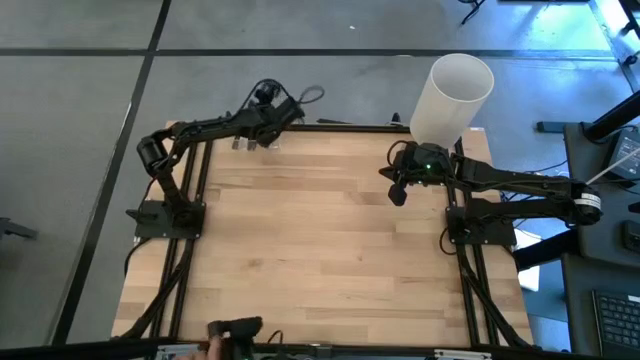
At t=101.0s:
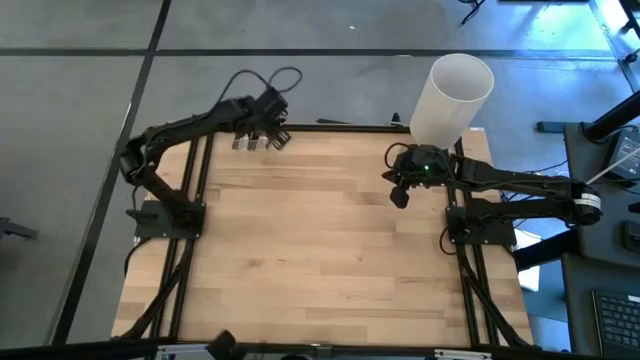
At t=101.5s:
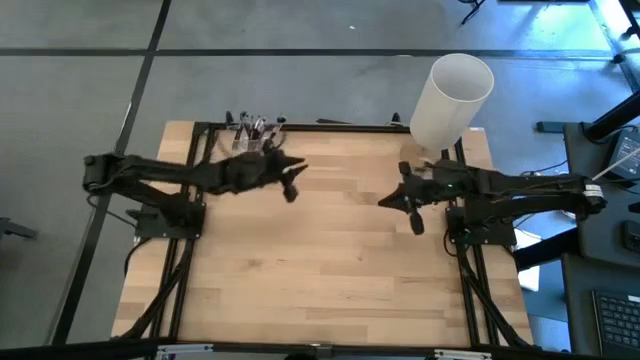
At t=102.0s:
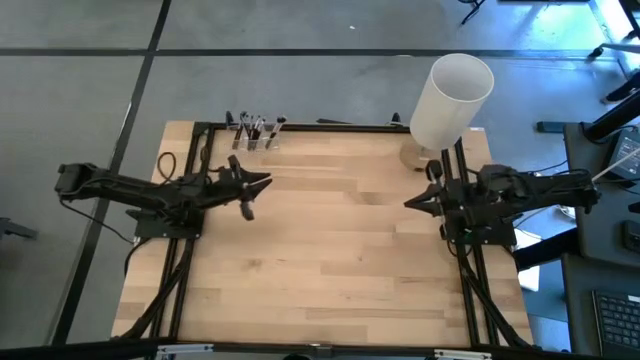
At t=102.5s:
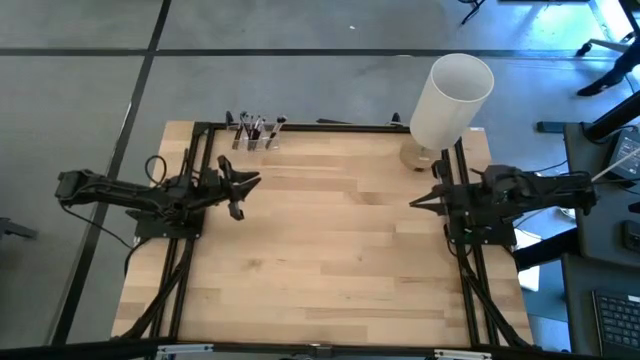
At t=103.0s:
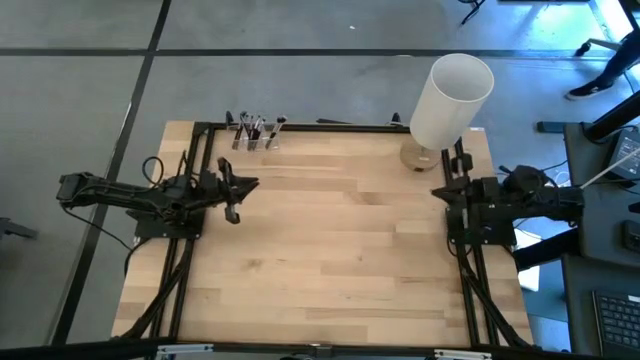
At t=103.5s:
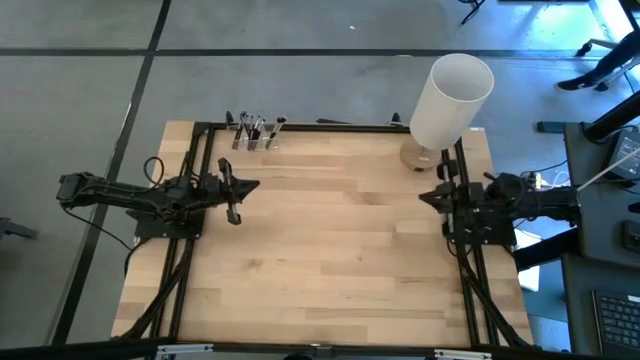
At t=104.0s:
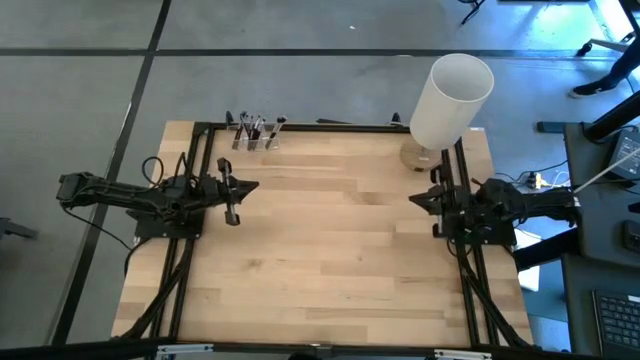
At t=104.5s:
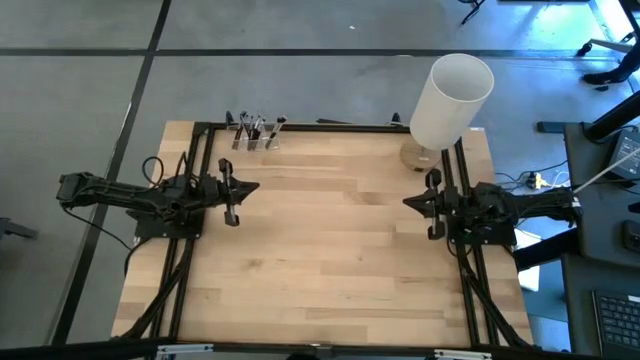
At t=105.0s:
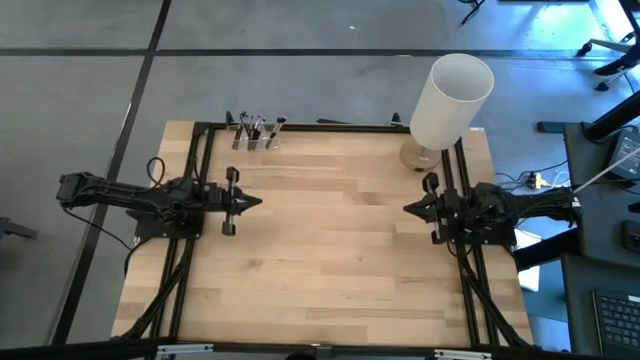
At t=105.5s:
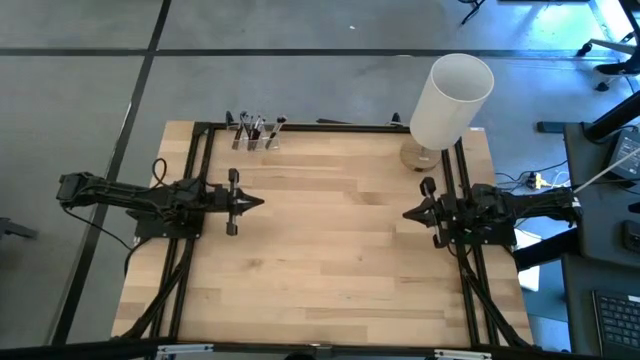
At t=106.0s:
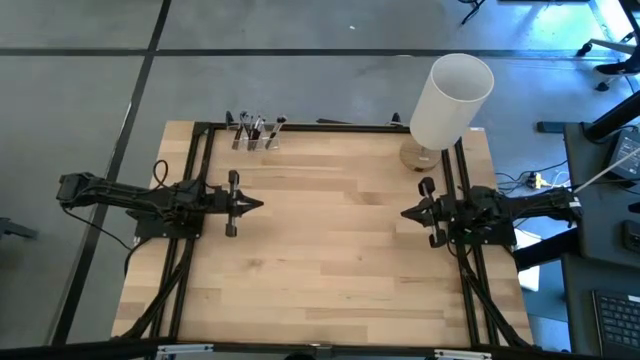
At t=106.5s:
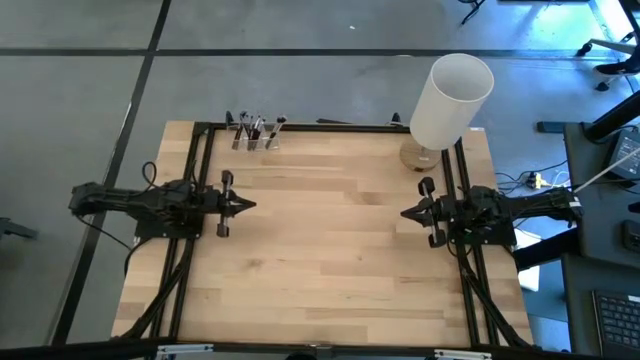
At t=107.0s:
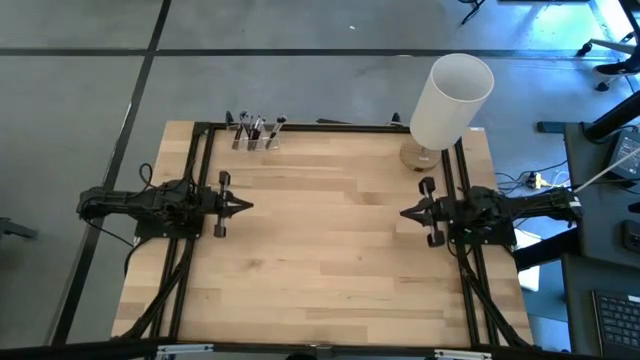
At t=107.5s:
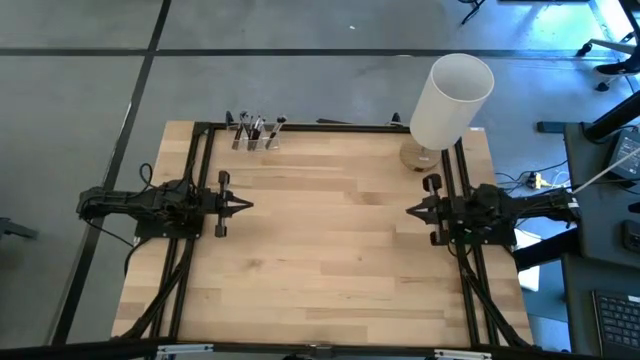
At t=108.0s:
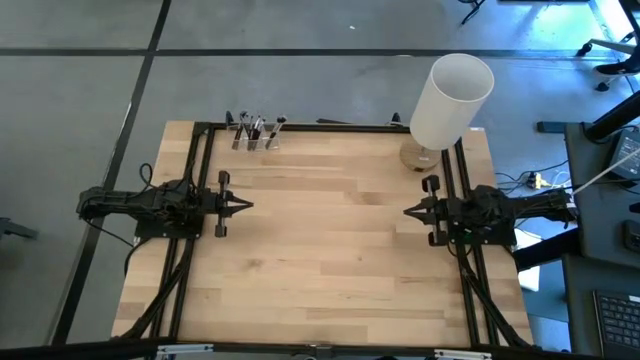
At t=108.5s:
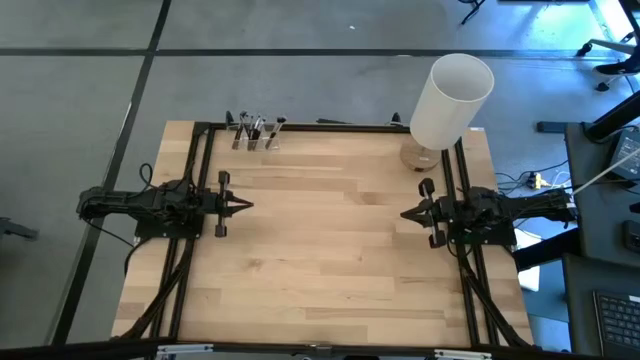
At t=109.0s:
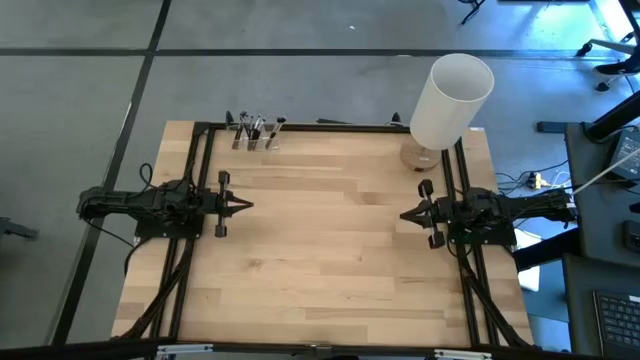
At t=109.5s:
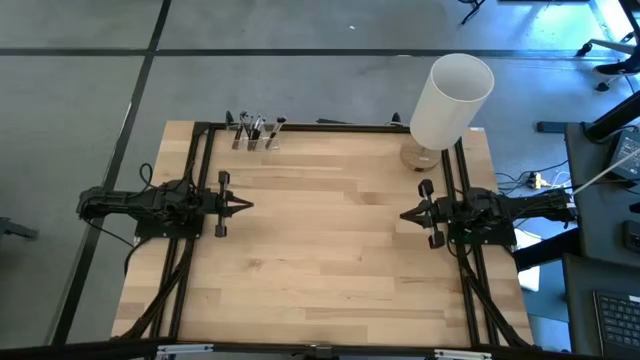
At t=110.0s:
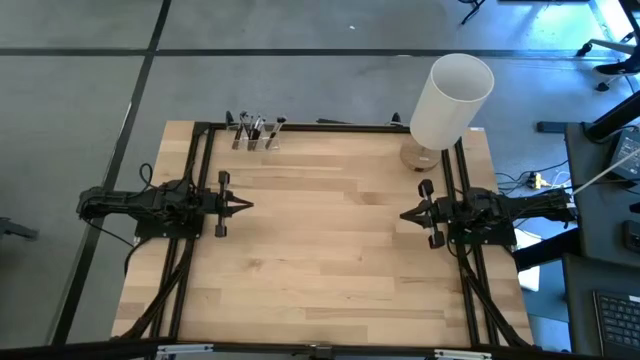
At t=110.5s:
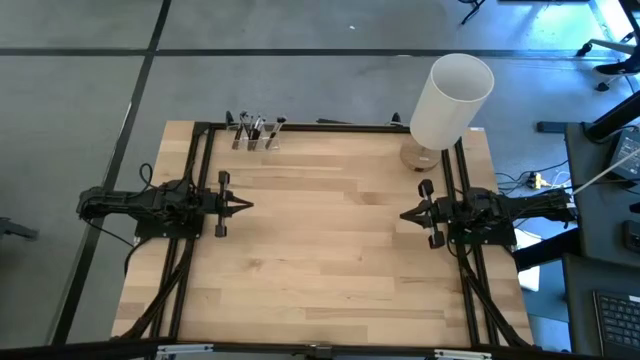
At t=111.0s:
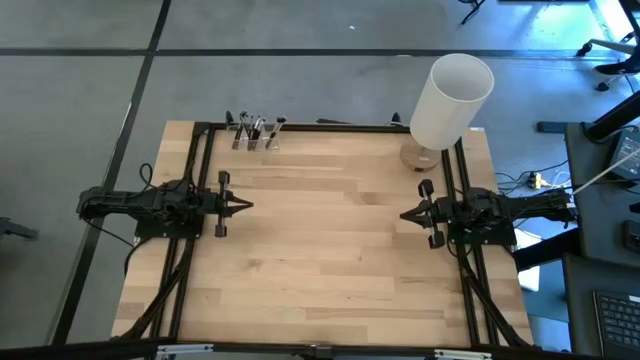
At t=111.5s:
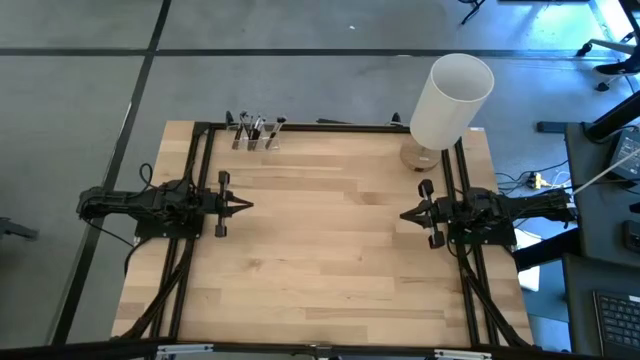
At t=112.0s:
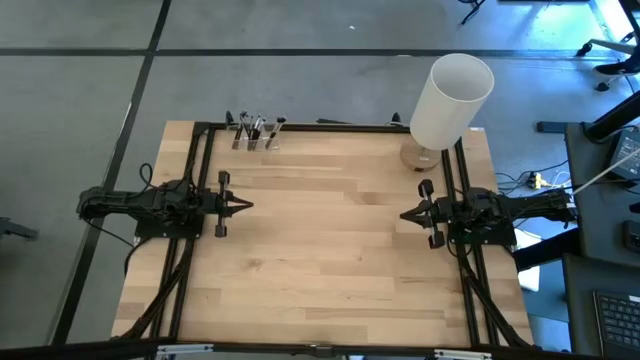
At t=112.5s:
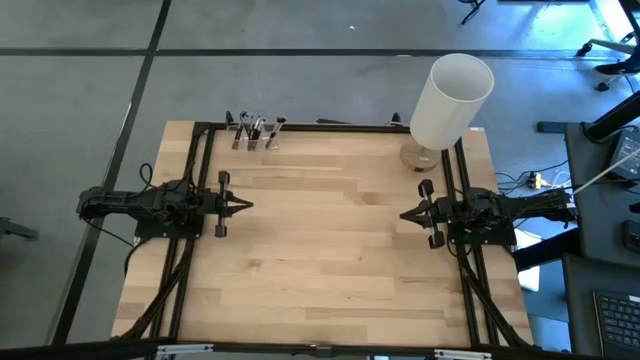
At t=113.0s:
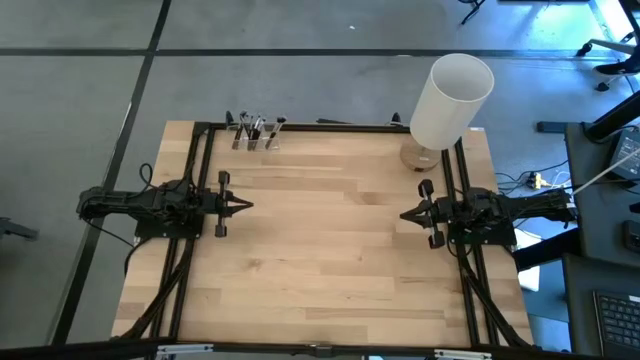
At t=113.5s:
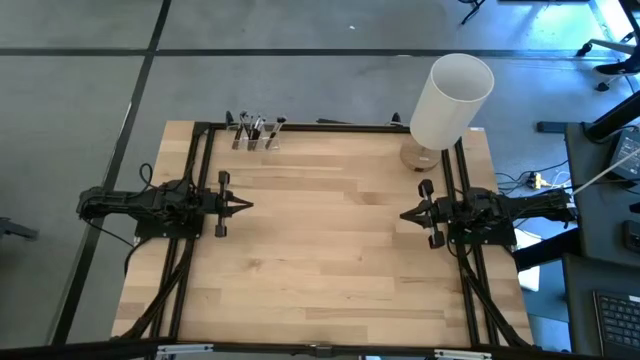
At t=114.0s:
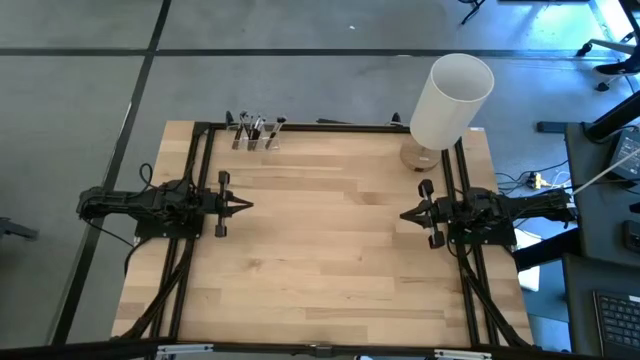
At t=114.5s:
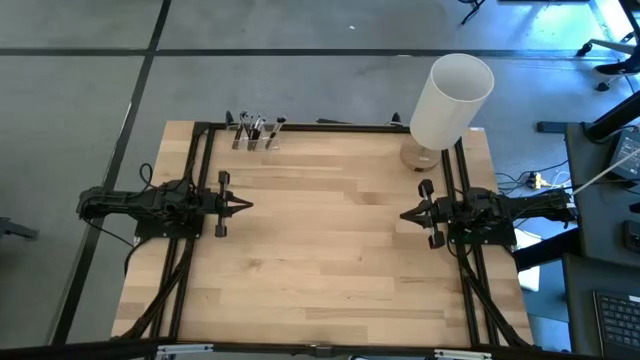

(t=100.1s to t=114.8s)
Task: Put items in baskets/containers
Return to Home Position

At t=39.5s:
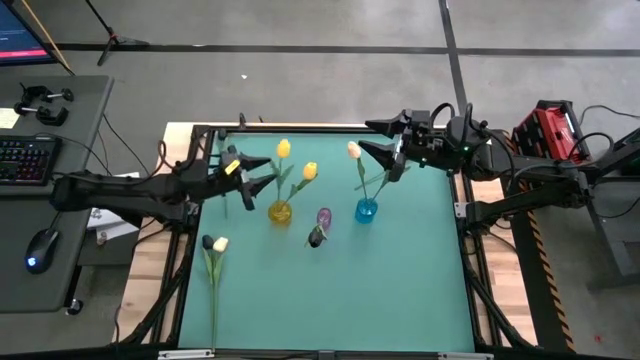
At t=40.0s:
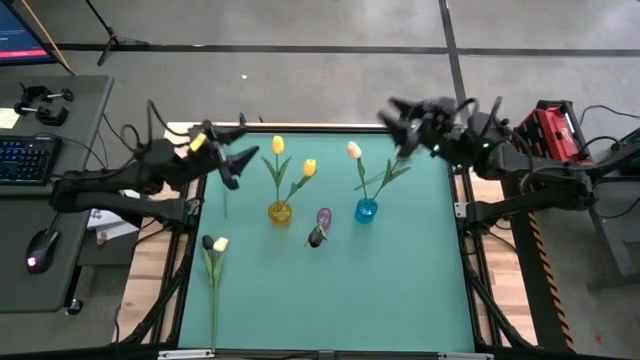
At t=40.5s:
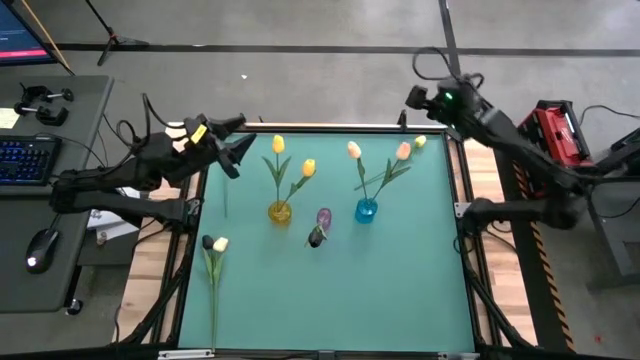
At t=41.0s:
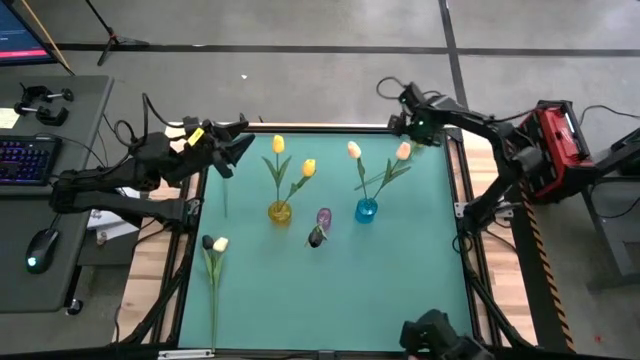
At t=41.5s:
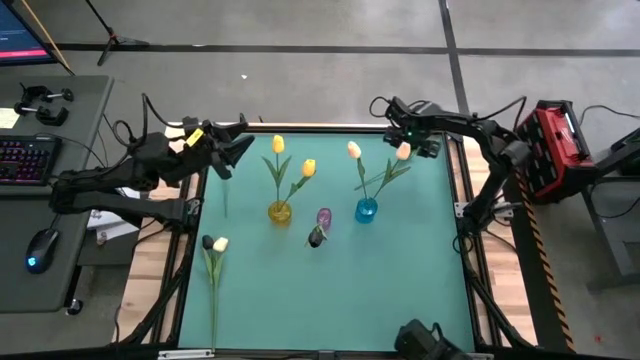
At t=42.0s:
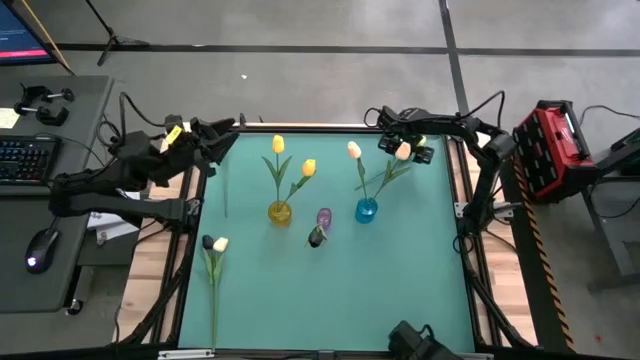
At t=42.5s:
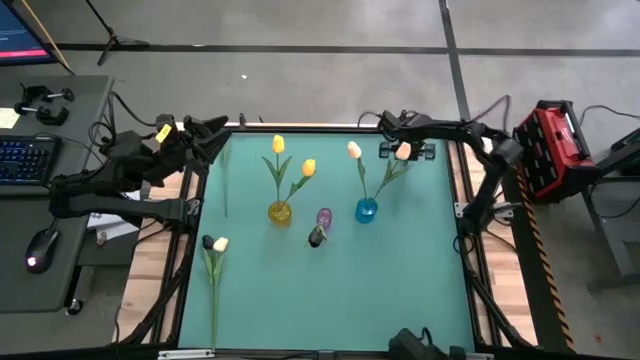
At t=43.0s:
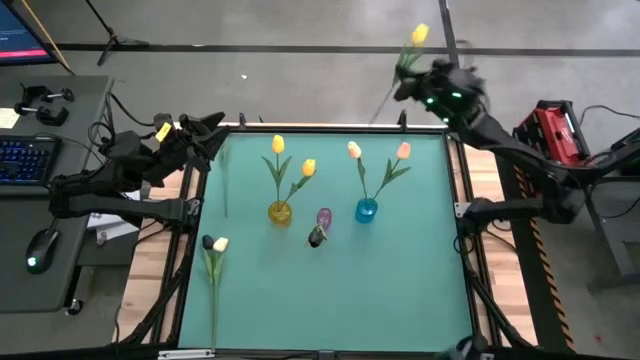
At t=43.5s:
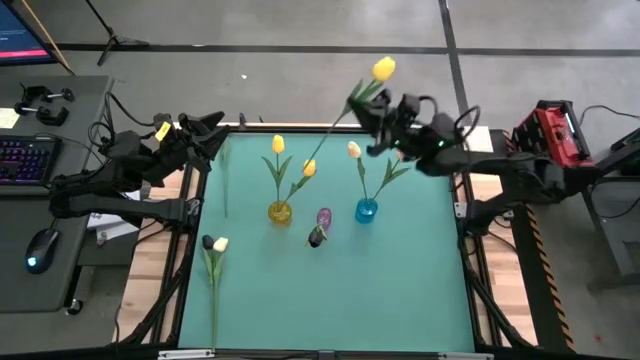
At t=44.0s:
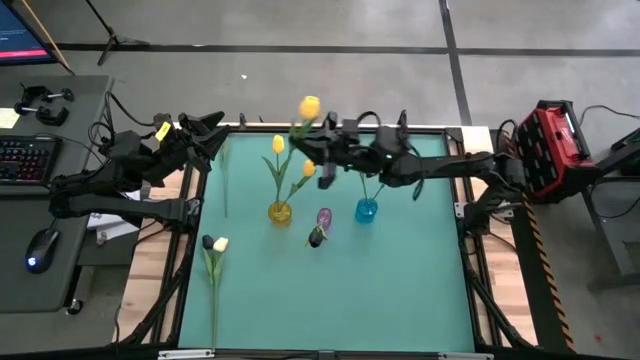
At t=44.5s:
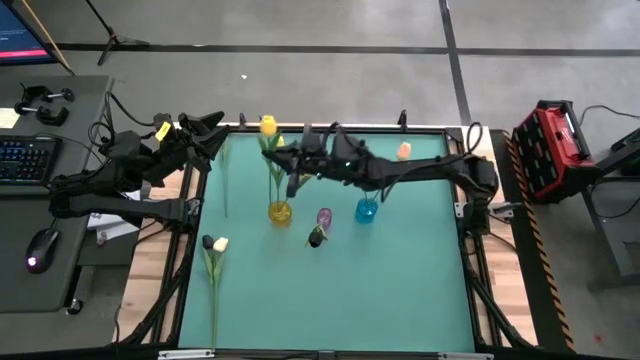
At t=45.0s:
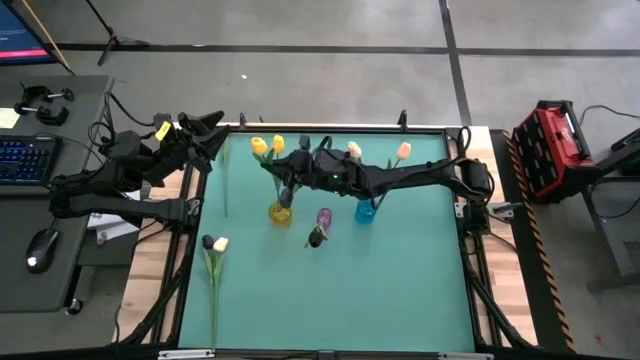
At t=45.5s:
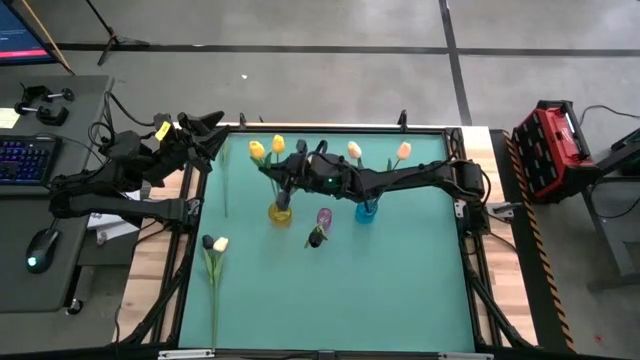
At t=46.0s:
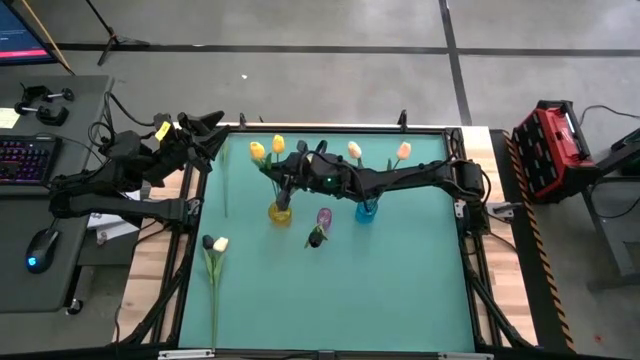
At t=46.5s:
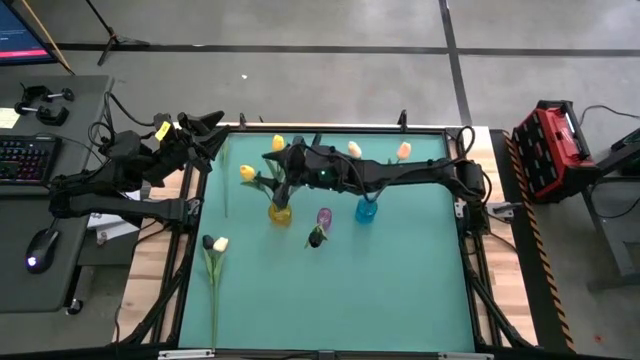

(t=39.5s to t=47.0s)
Task: Sort flowers into vase by color
Put the yellow tulip into the yellow flower vase
